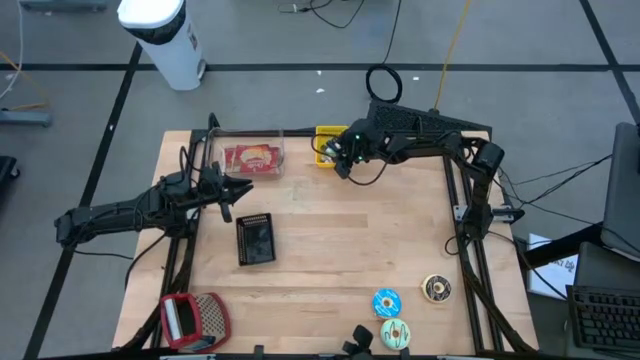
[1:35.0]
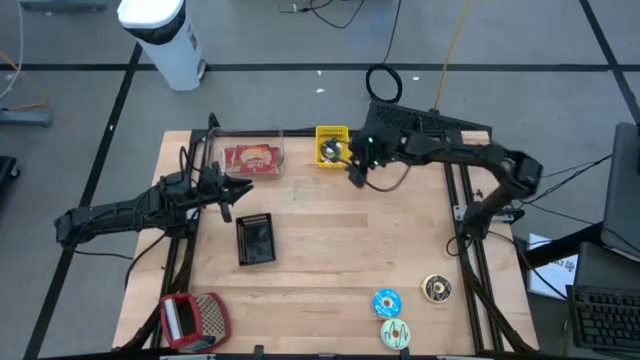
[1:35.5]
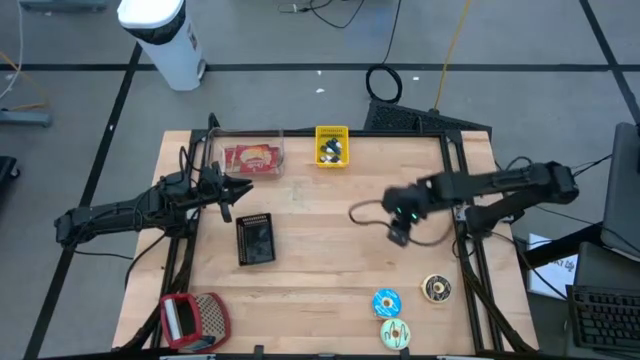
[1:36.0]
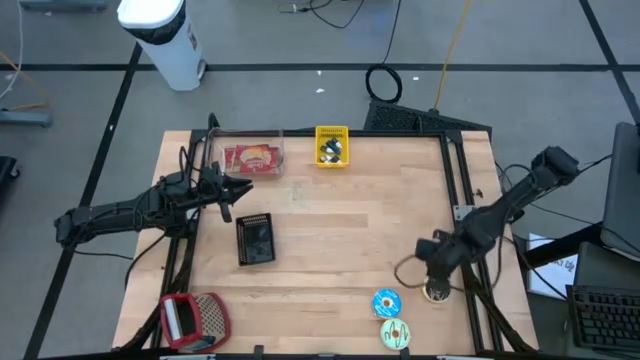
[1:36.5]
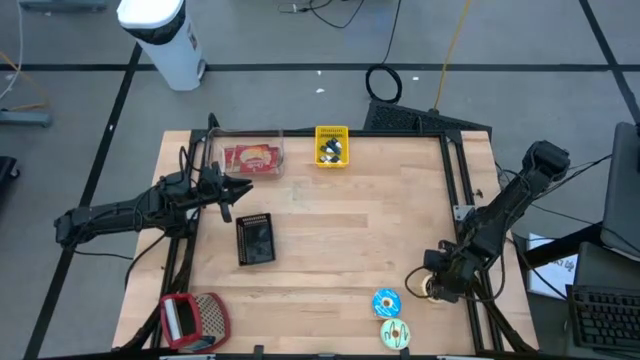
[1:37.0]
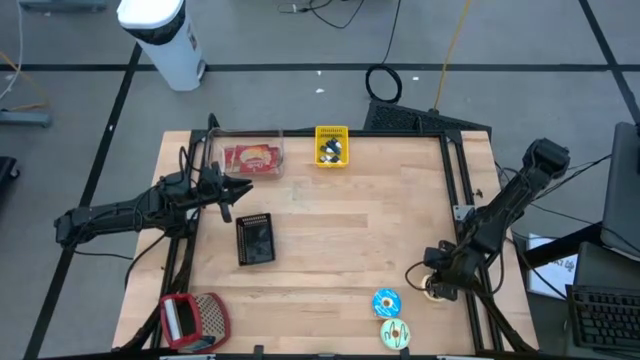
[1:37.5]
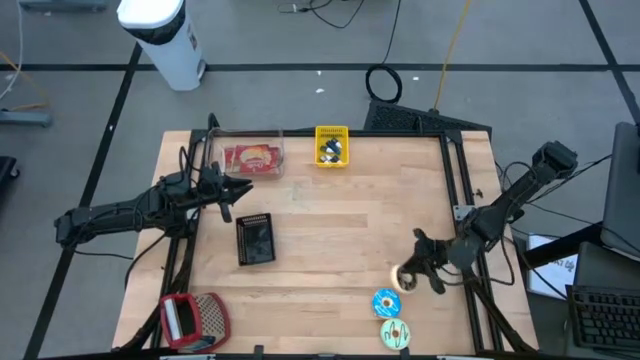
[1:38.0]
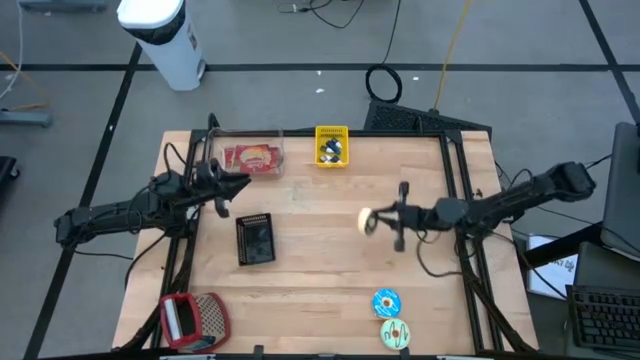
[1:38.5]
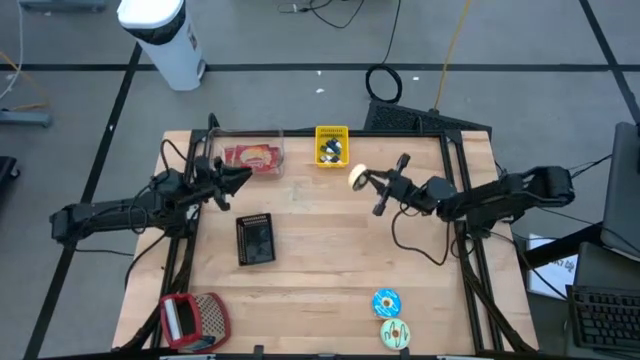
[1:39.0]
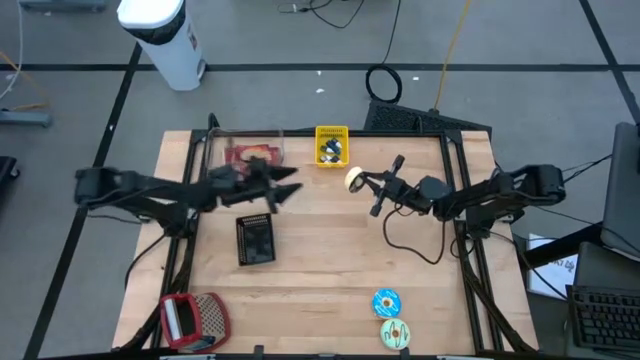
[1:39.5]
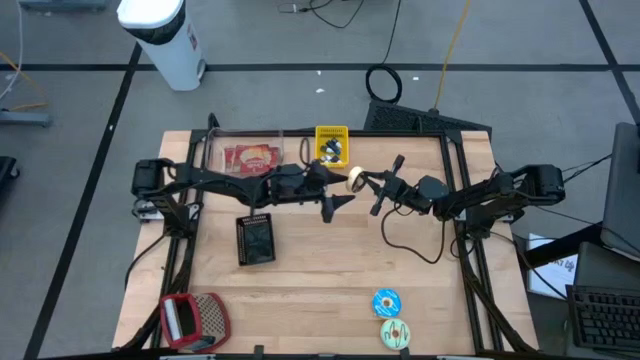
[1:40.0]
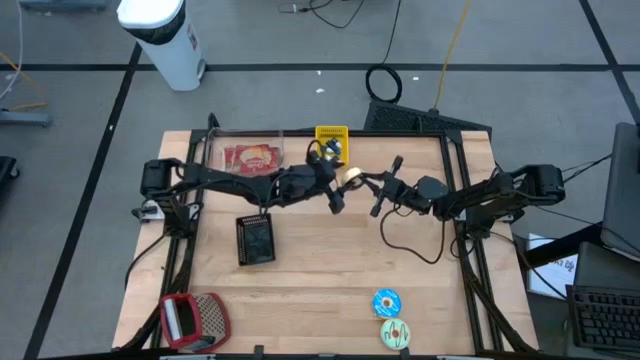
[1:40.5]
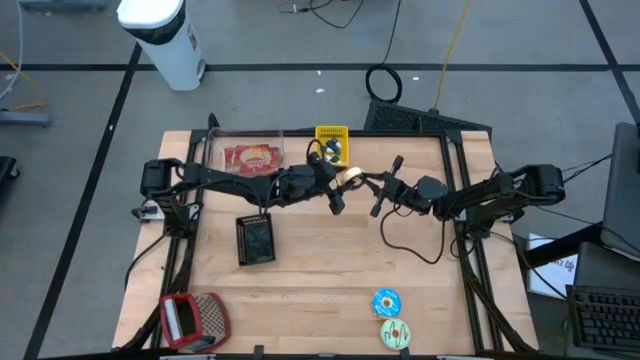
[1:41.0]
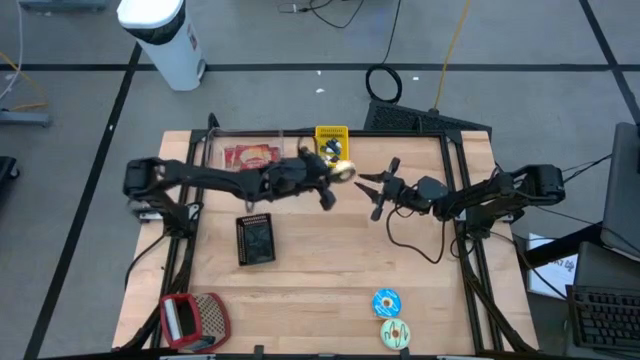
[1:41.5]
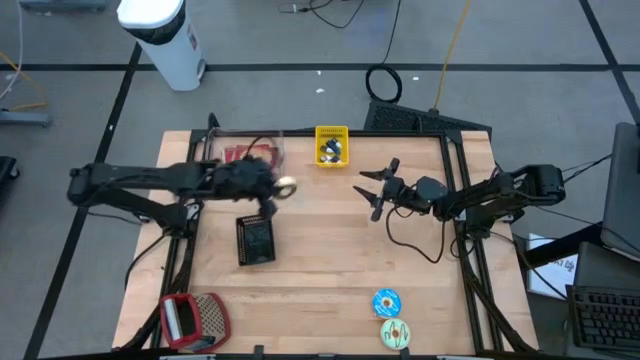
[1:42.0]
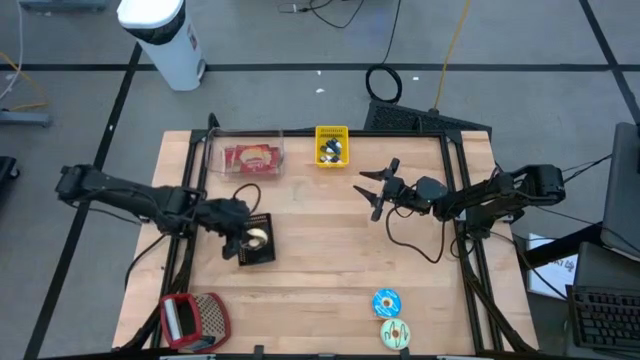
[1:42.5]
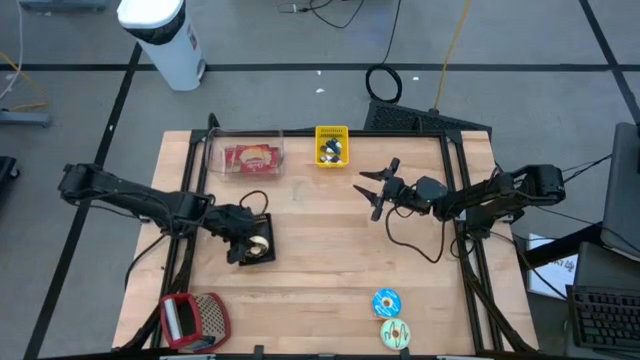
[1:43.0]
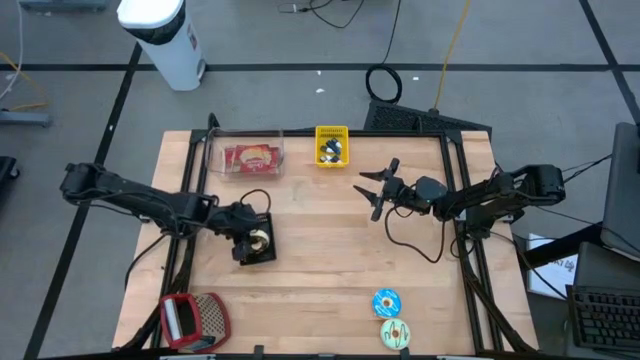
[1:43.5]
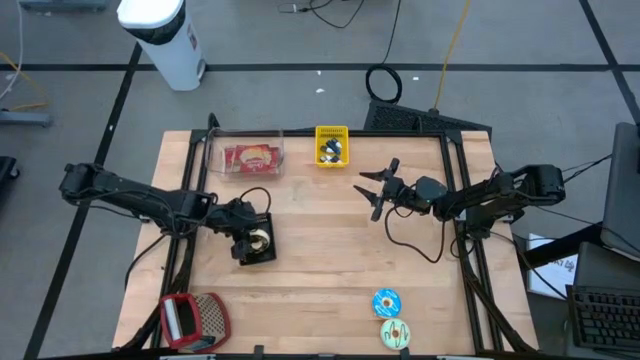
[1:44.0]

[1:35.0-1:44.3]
Task: Pick & Place Food Item
Put the black donut into the black bin

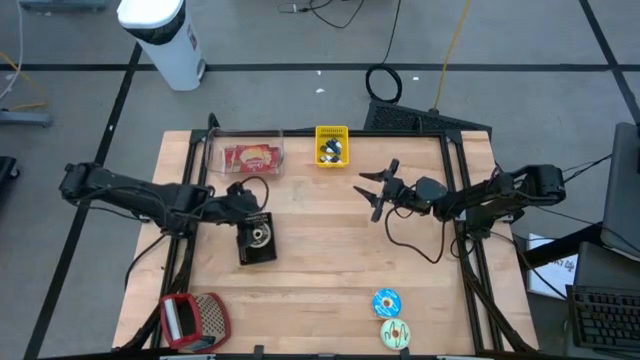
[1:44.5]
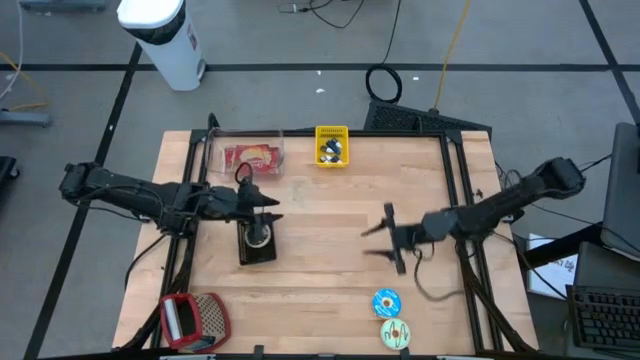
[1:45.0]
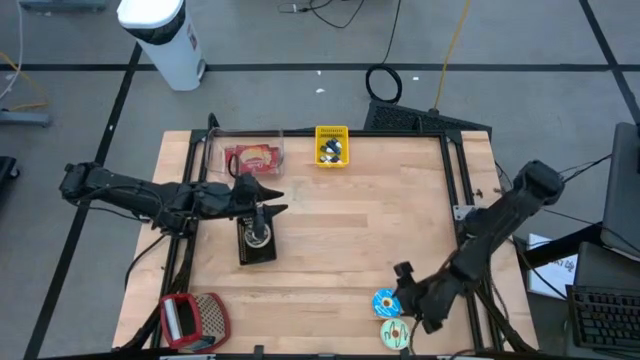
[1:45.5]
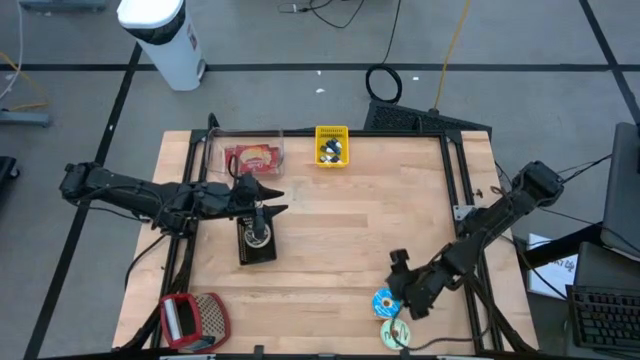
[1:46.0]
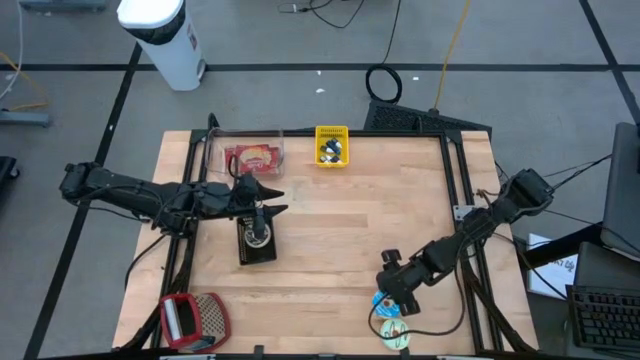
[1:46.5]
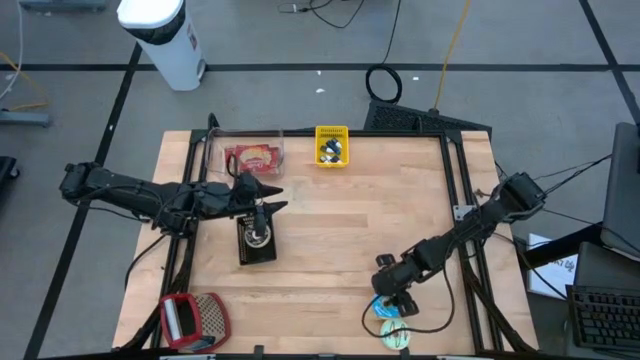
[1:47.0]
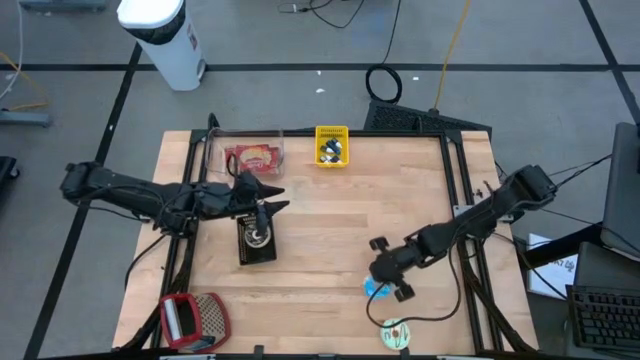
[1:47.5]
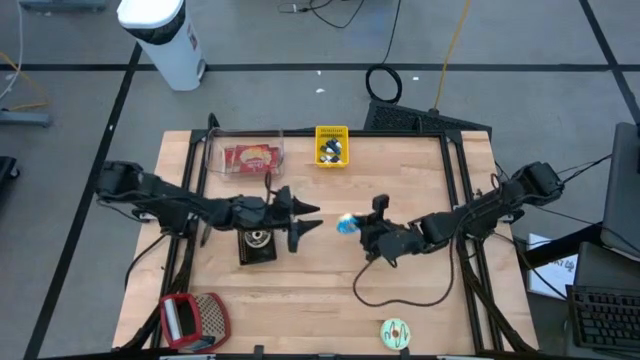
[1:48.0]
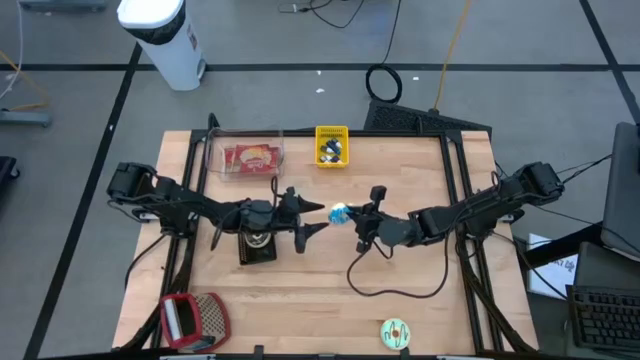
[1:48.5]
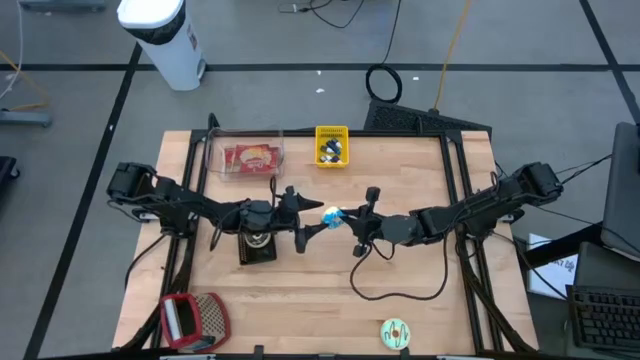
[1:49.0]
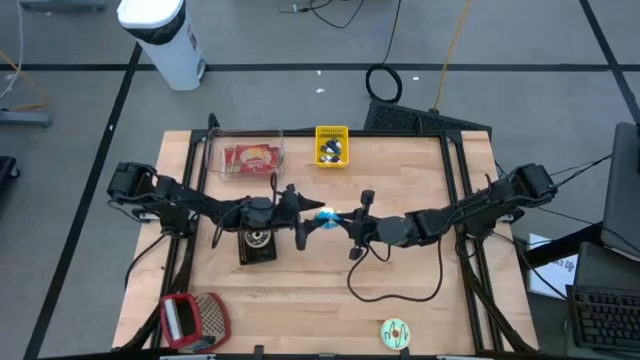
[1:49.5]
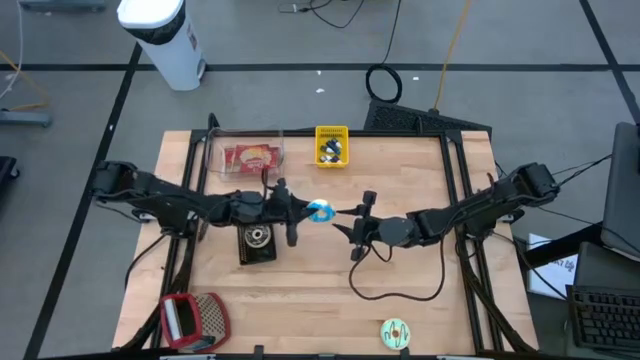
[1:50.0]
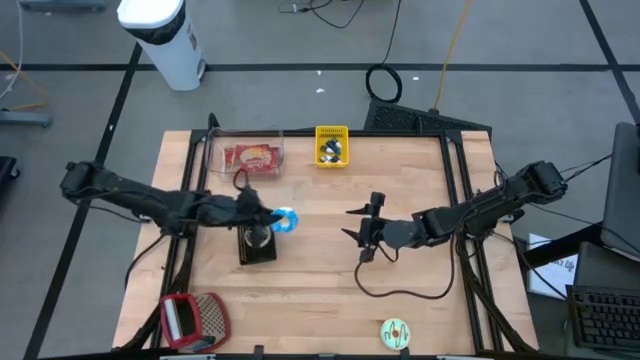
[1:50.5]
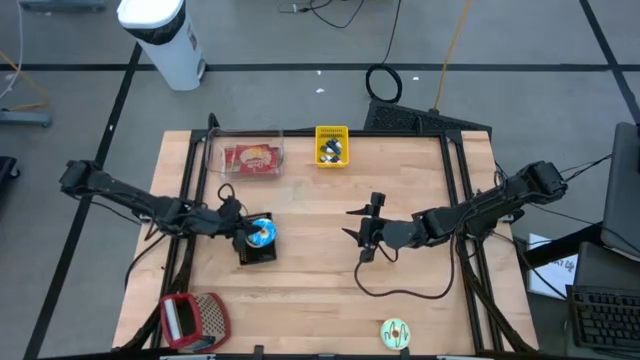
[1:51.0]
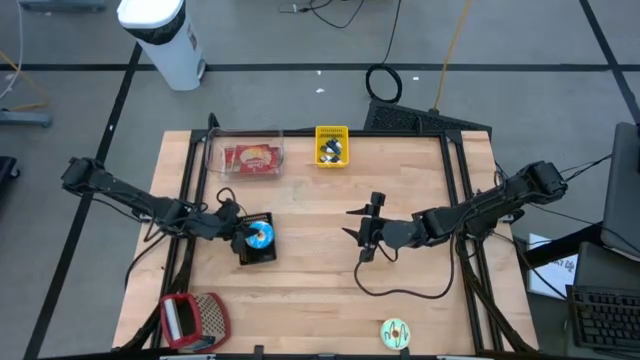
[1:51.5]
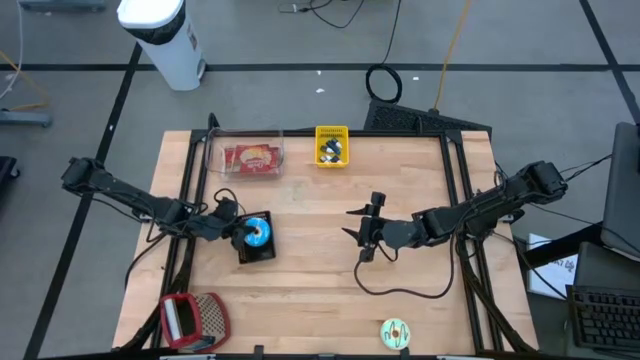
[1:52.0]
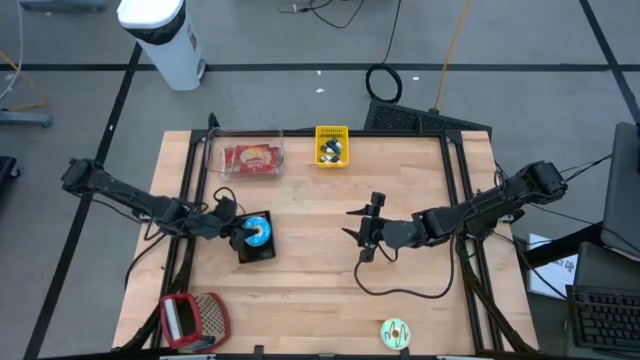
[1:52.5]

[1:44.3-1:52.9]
Put the blue donut into the black bin

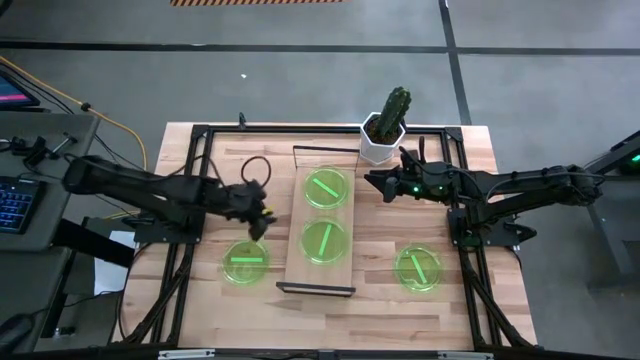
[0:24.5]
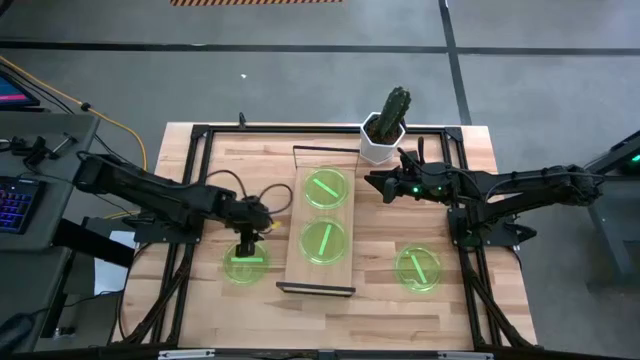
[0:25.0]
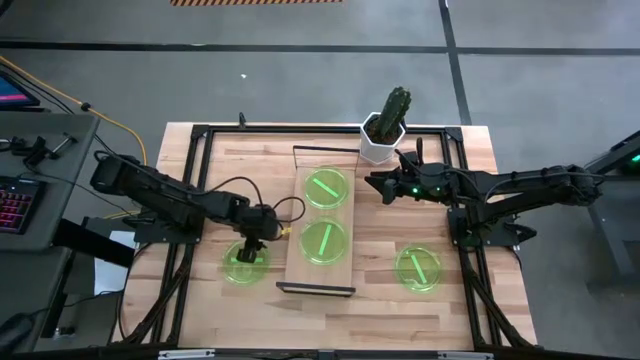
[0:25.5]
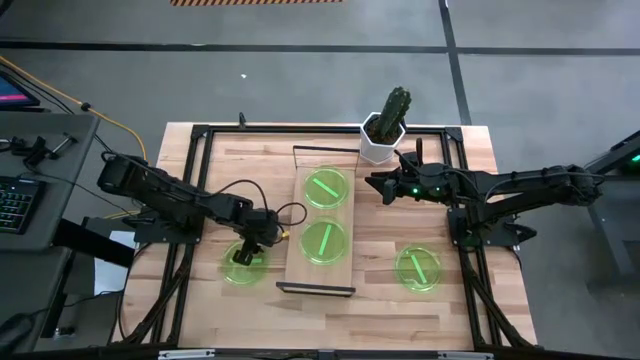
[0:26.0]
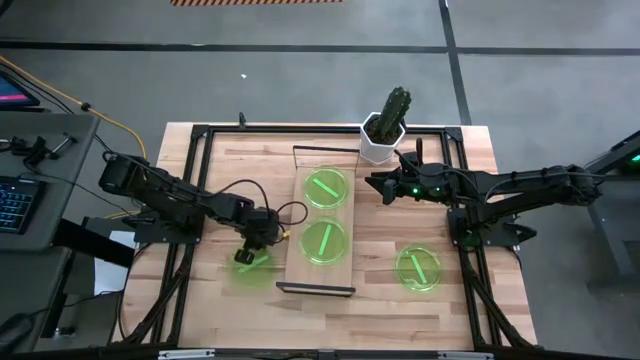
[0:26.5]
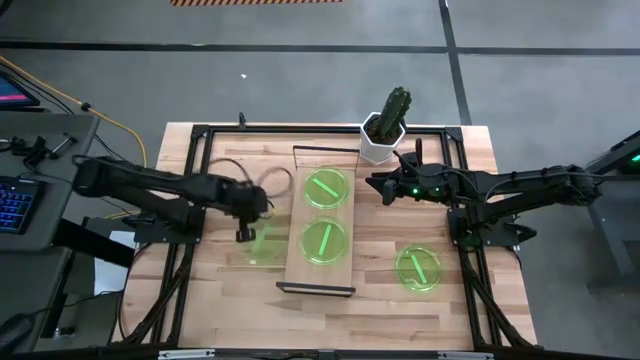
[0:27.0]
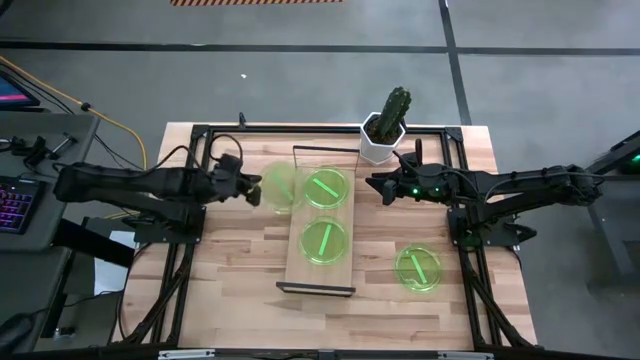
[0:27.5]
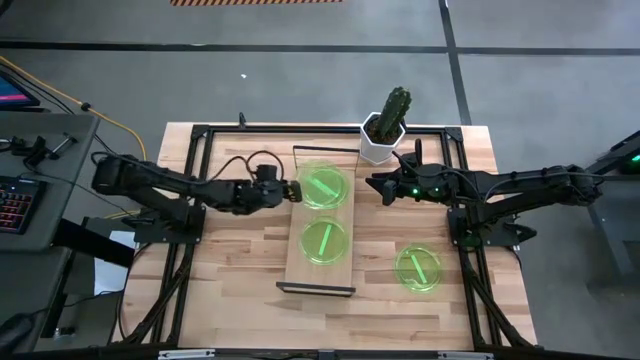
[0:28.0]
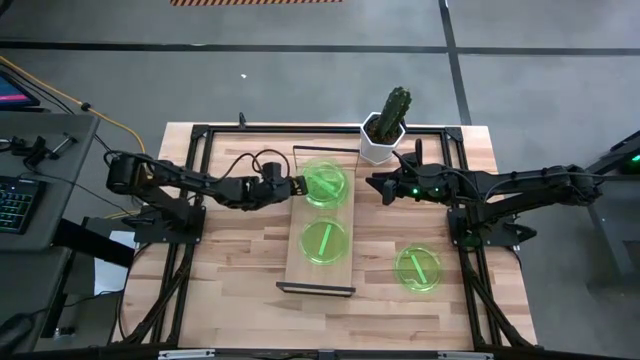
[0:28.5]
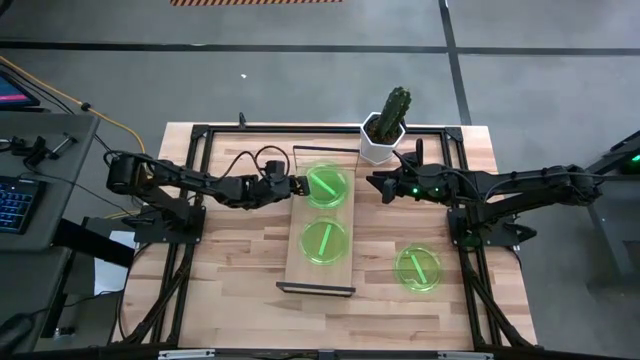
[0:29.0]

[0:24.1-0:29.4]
Task: Place and stack plates onto a shelf
Stack the left green plate on top of the green plate on the shelf
